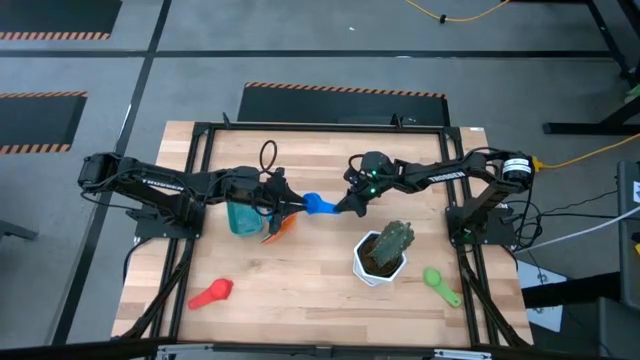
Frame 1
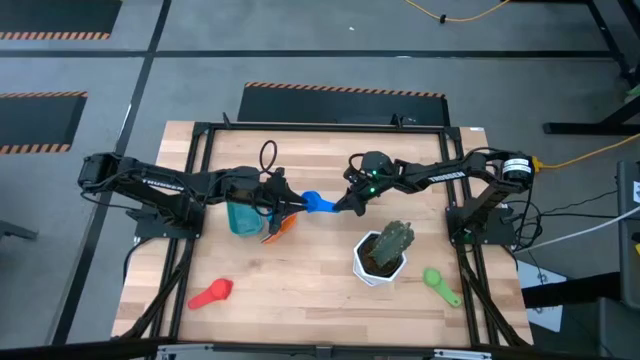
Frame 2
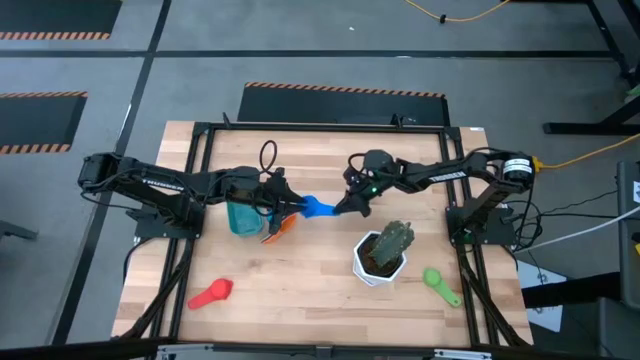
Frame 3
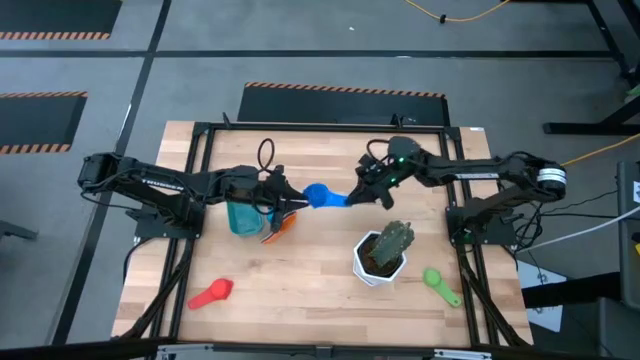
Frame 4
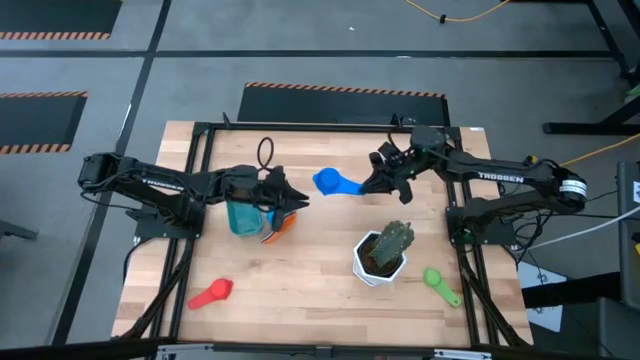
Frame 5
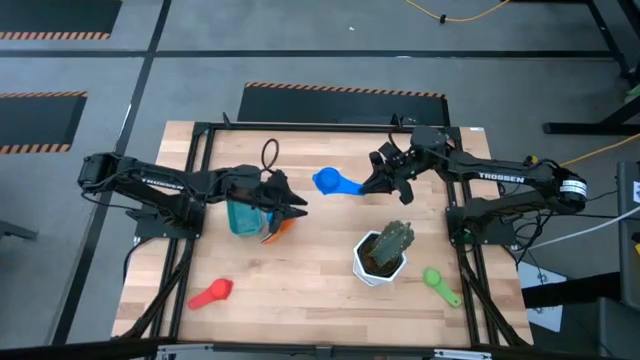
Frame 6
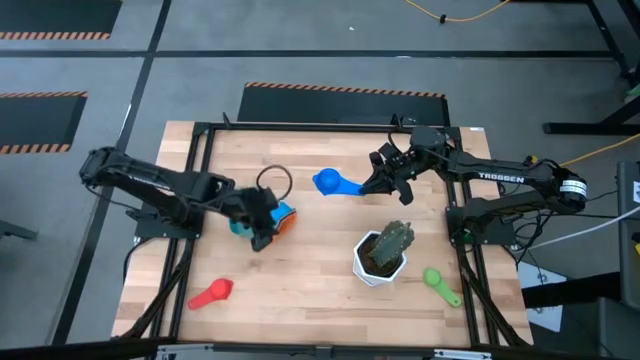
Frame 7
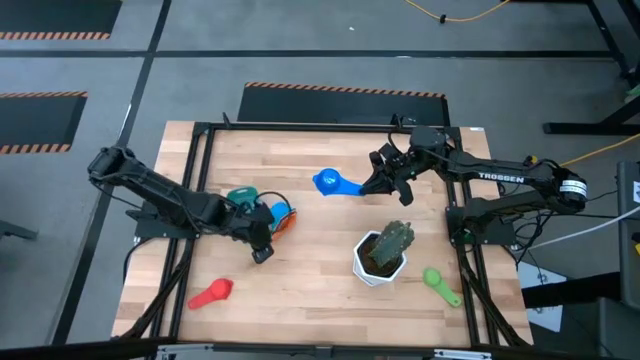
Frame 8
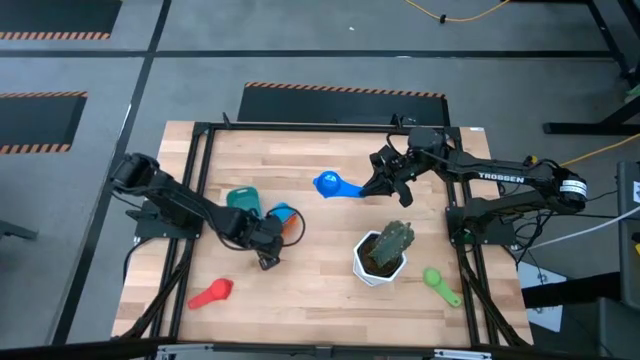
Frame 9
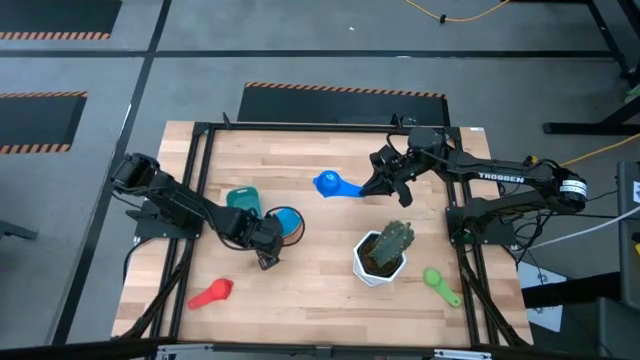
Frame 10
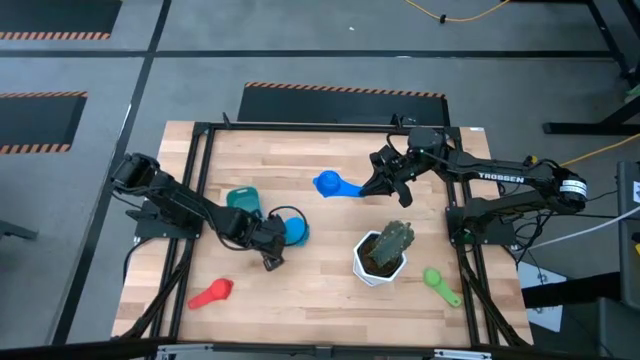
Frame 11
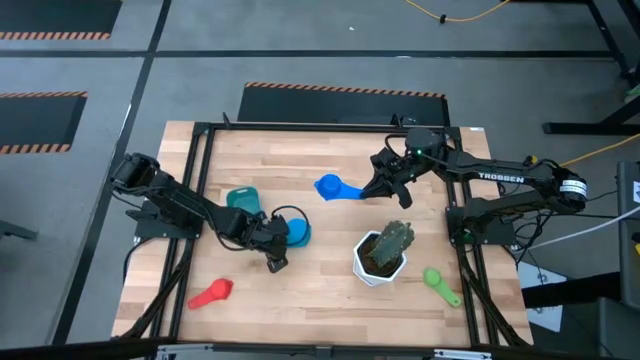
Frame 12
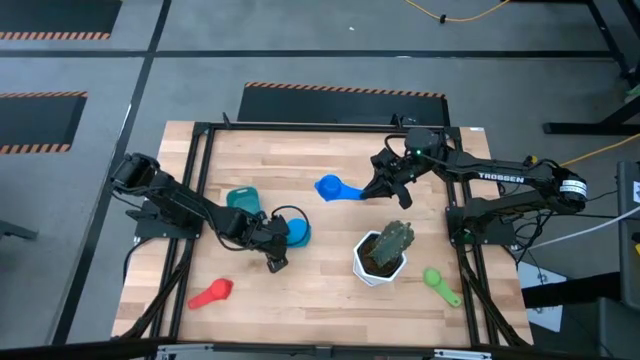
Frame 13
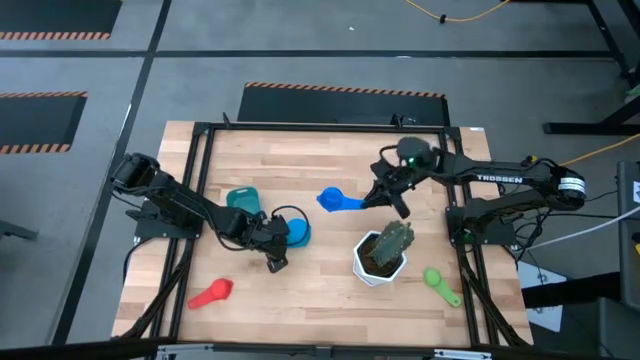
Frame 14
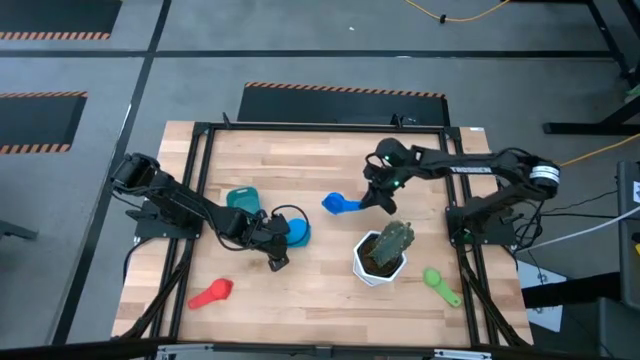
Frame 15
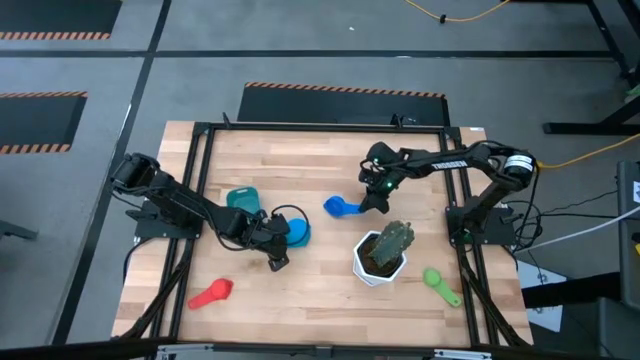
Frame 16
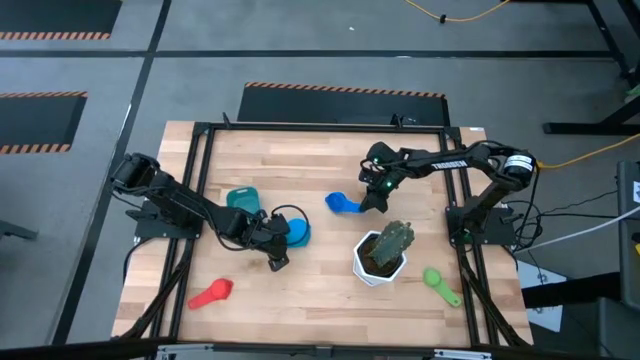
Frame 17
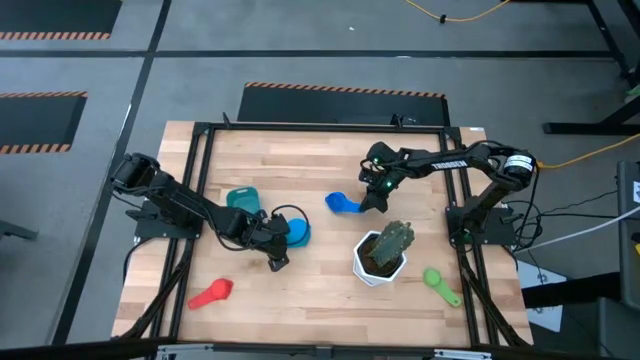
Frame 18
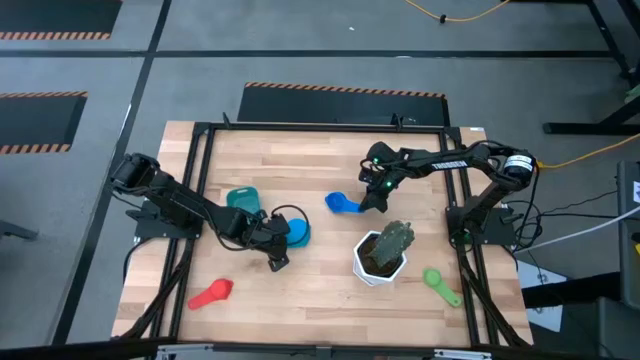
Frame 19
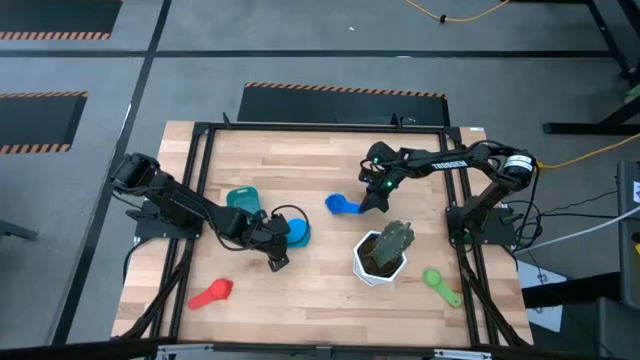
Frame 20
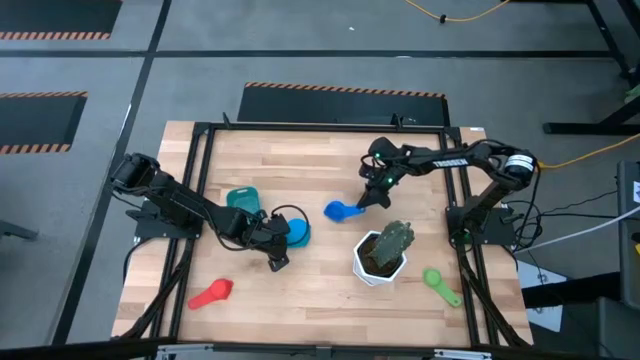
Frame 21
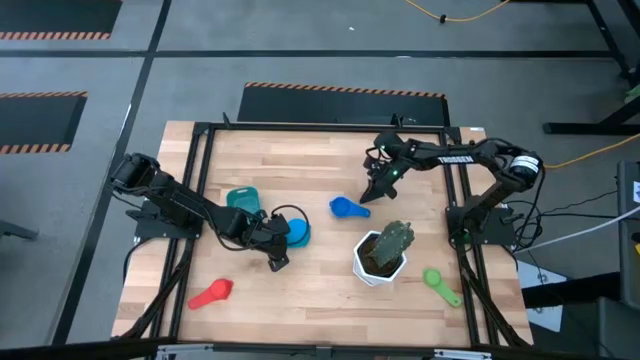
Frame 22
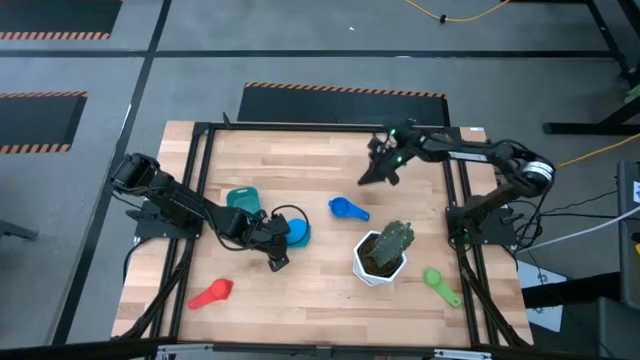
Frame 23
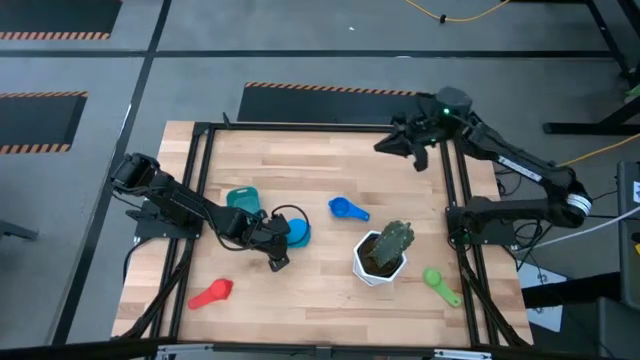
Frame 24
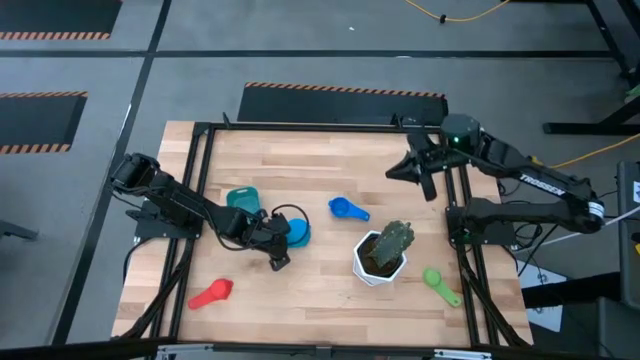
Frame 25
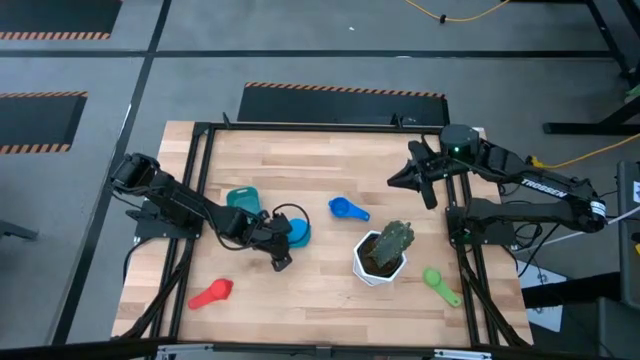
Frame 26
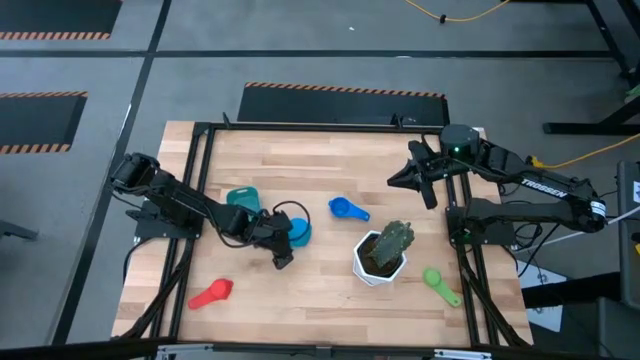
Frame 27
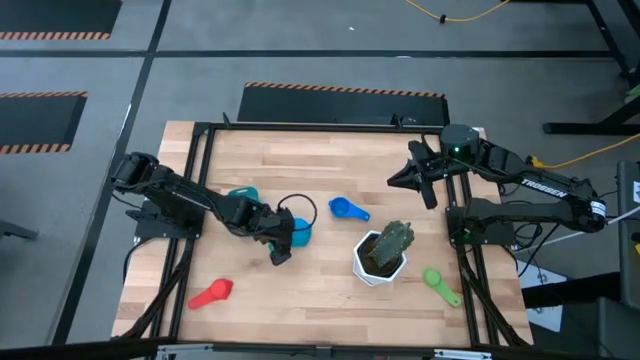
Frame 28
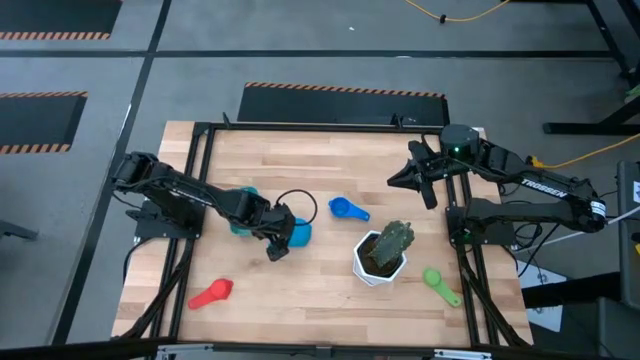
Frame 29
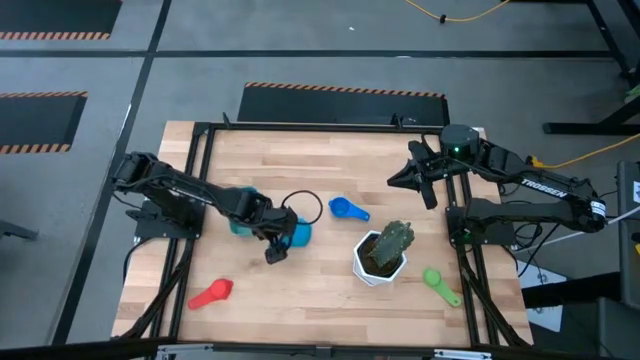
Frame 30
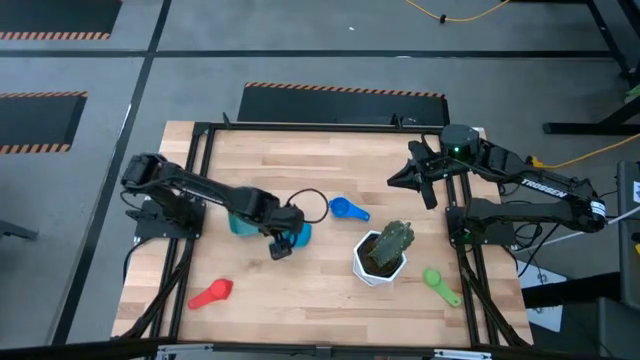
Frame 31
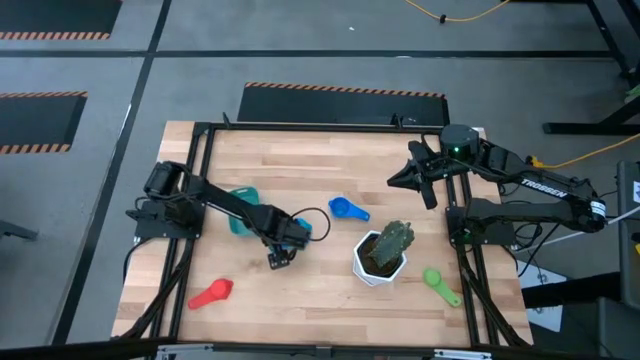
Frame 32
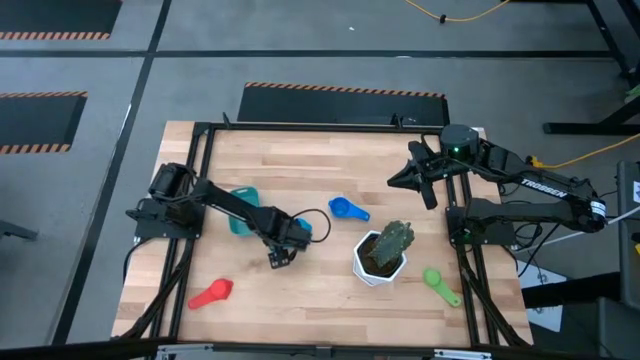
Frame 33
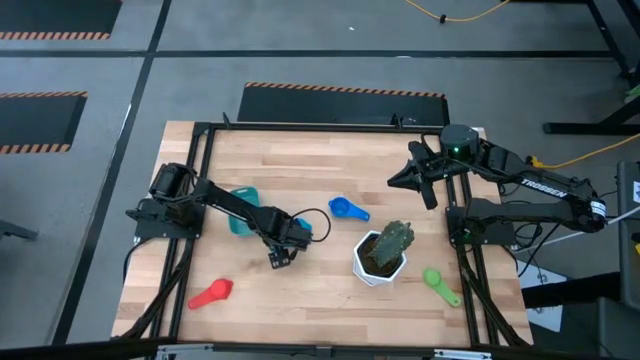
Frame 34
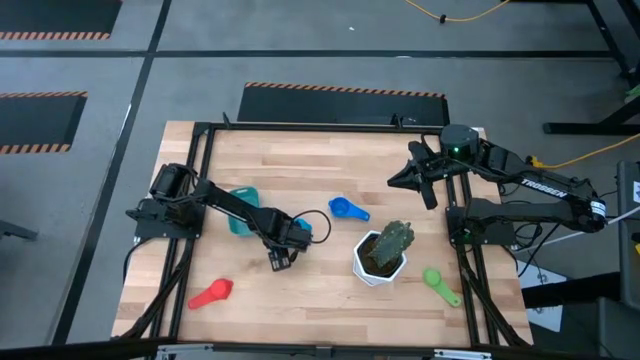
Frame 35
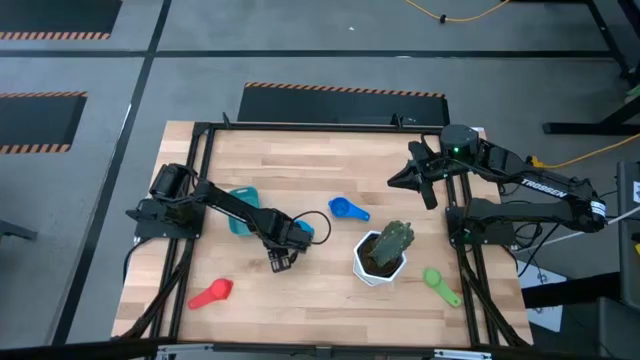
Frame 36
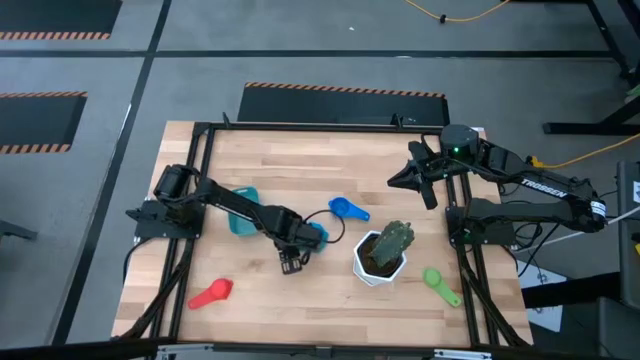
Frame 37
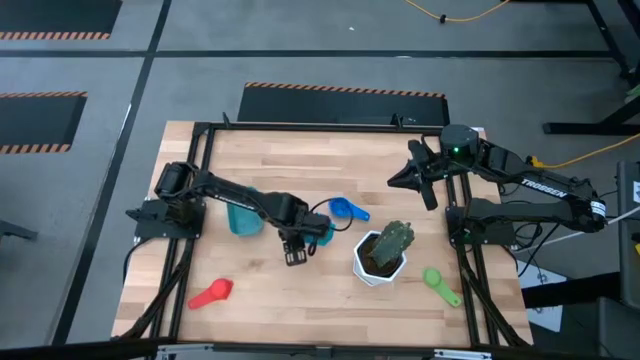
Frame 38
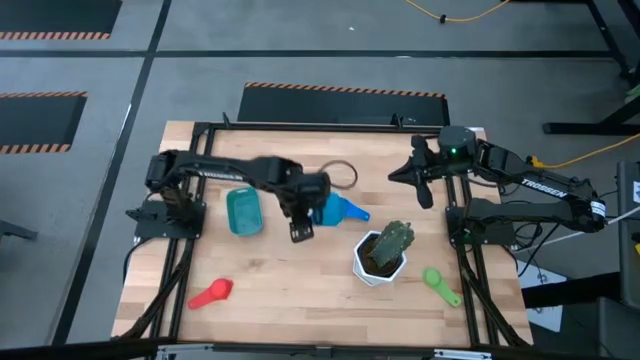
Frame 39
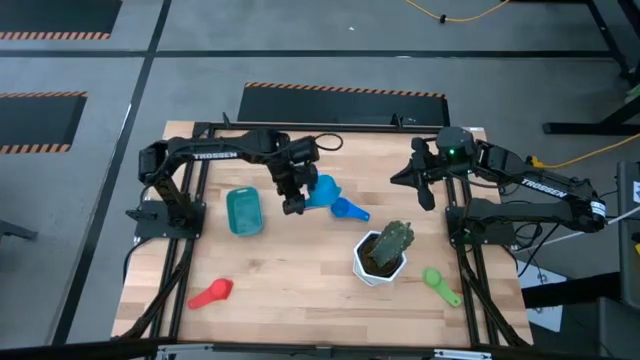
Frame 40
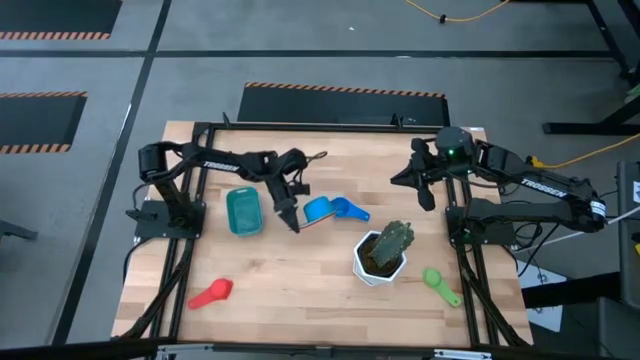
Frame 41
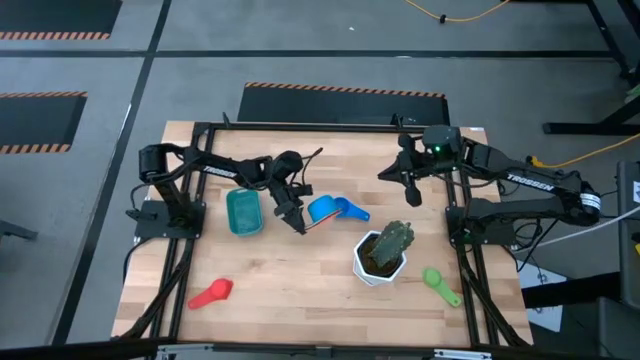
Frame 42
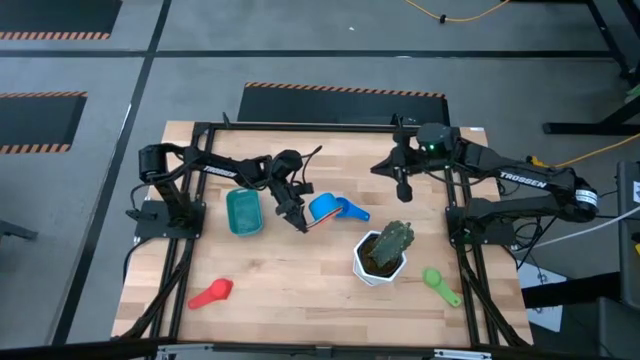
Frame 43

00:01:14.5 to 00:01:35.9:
Task: Nest measuring cups in basket
Stack the blue measuring cup on top of the orange measuring cup
